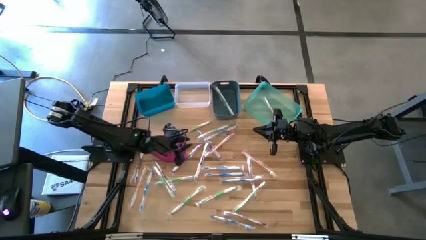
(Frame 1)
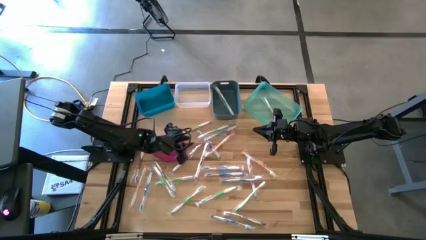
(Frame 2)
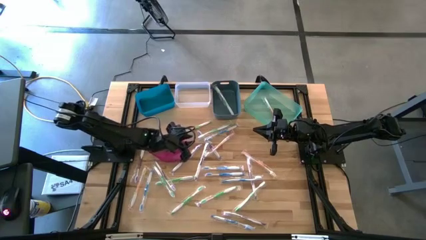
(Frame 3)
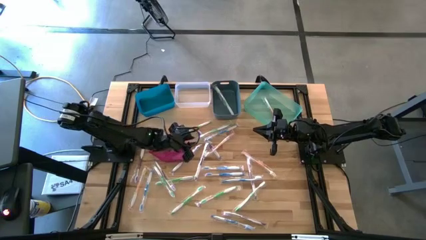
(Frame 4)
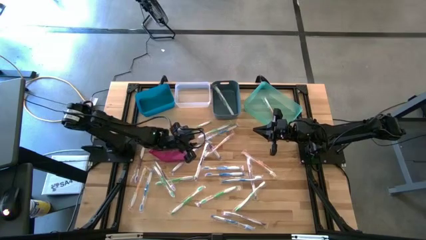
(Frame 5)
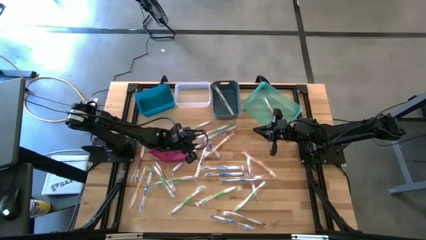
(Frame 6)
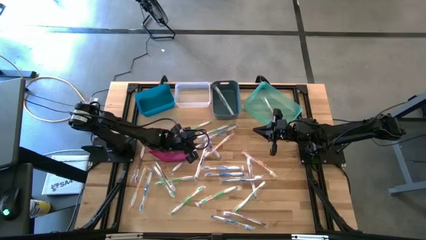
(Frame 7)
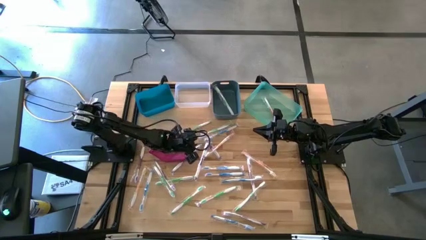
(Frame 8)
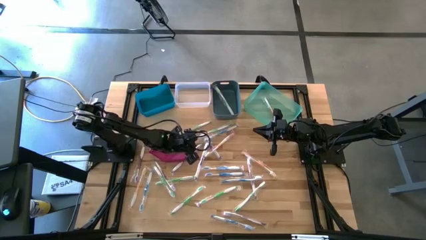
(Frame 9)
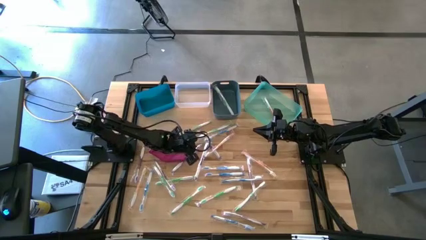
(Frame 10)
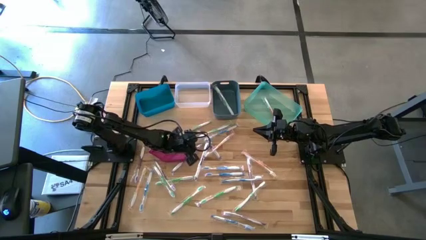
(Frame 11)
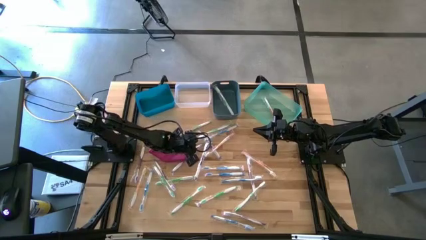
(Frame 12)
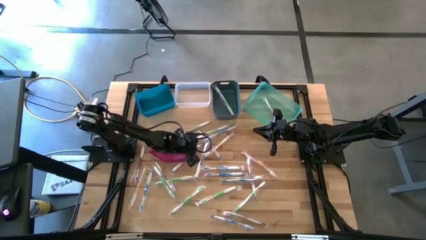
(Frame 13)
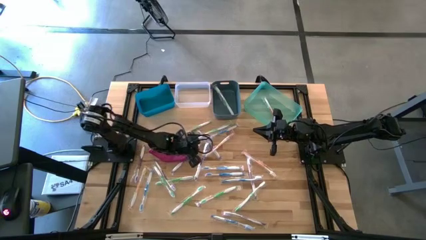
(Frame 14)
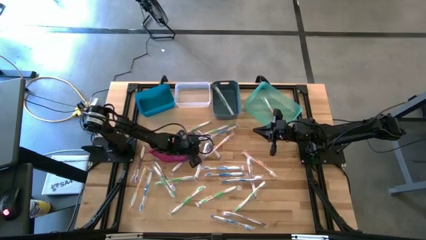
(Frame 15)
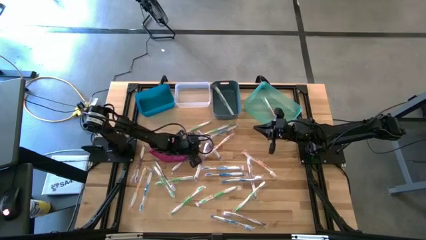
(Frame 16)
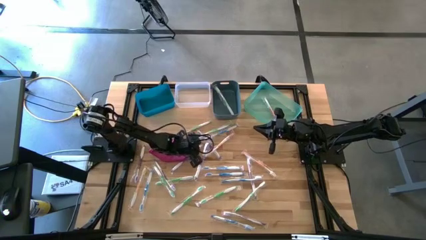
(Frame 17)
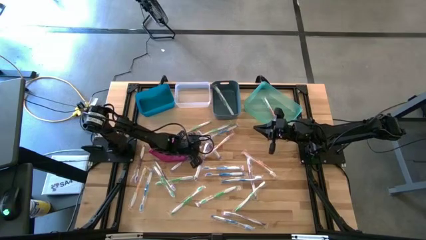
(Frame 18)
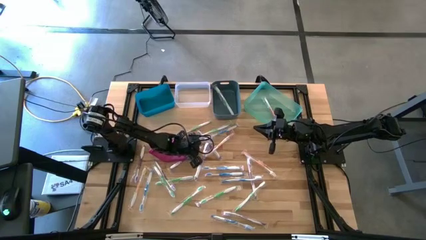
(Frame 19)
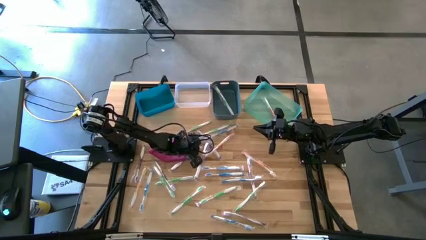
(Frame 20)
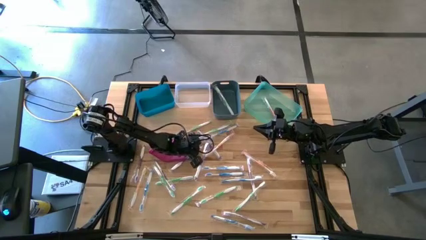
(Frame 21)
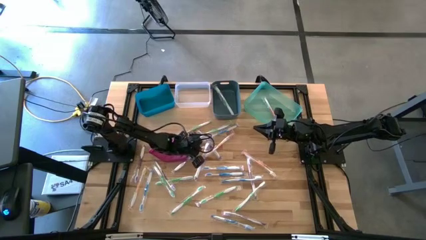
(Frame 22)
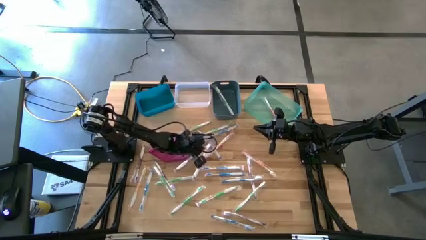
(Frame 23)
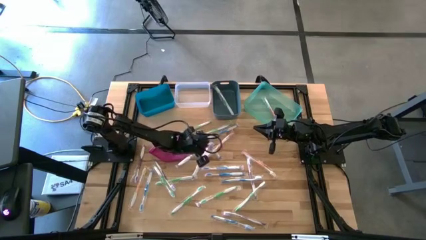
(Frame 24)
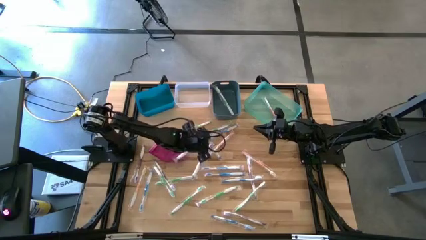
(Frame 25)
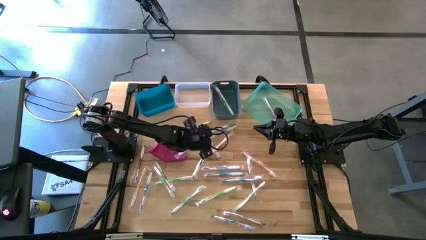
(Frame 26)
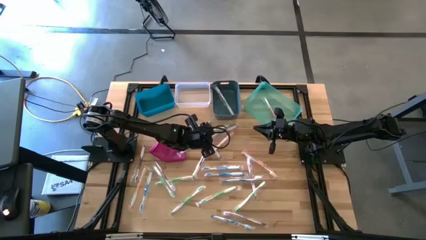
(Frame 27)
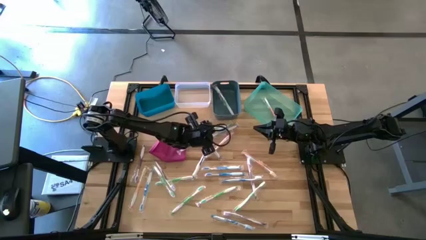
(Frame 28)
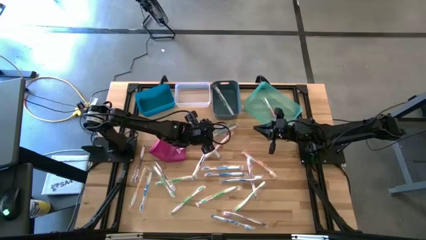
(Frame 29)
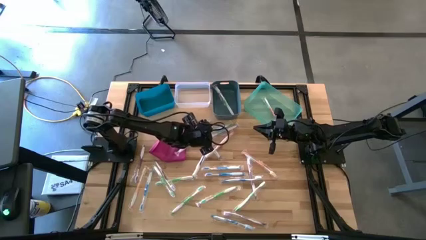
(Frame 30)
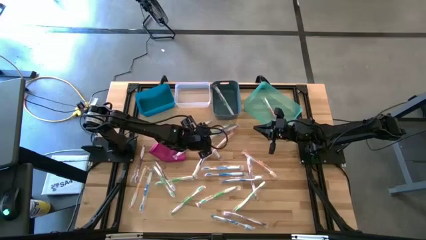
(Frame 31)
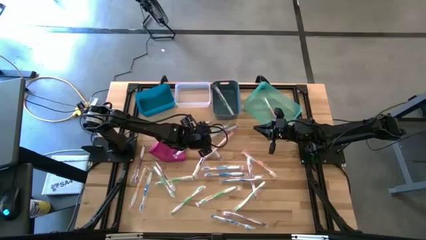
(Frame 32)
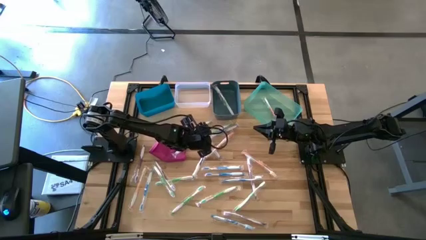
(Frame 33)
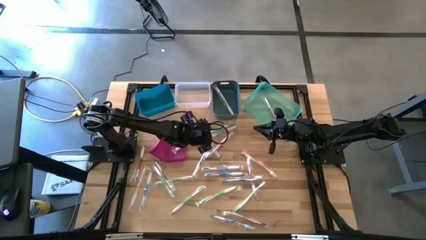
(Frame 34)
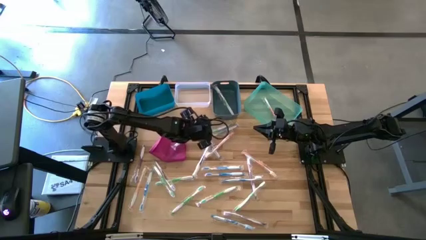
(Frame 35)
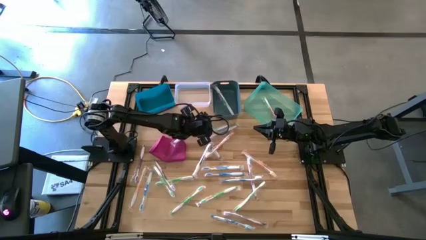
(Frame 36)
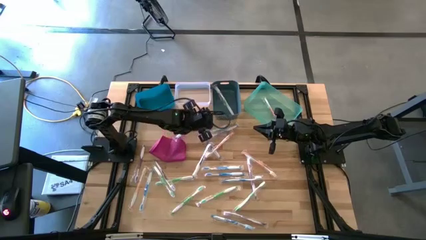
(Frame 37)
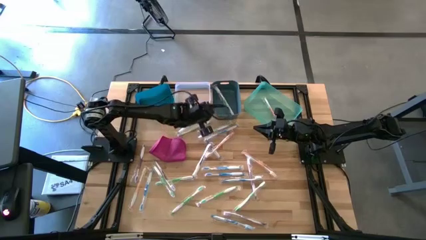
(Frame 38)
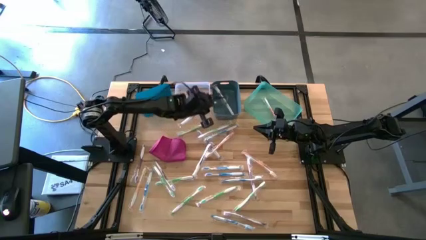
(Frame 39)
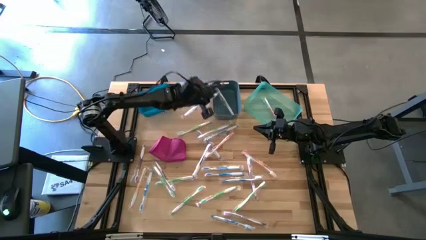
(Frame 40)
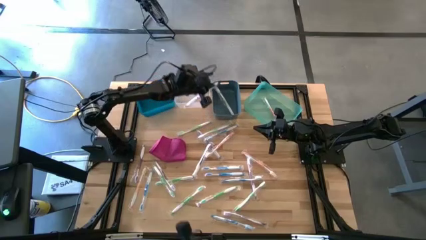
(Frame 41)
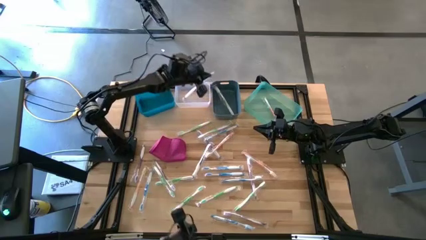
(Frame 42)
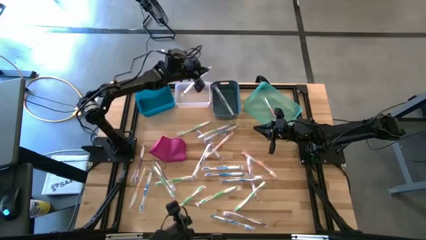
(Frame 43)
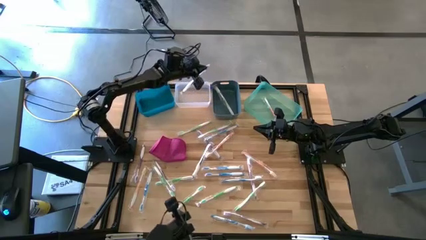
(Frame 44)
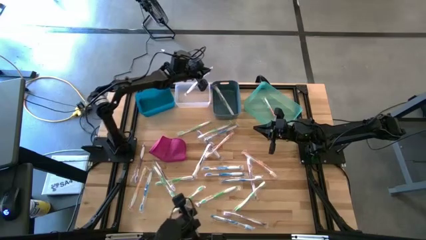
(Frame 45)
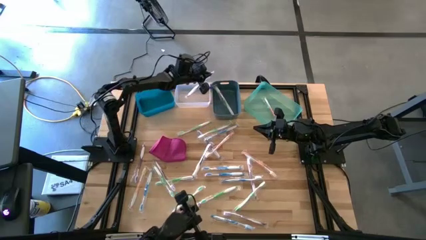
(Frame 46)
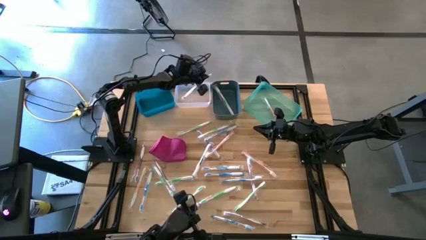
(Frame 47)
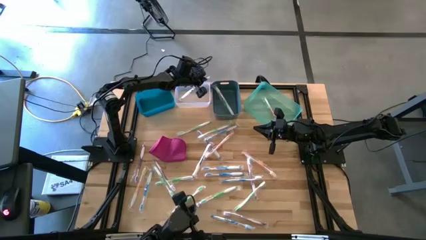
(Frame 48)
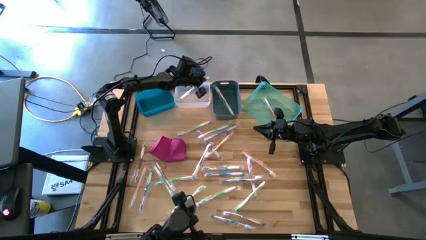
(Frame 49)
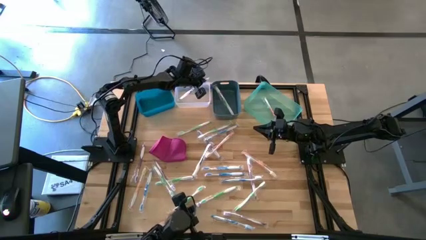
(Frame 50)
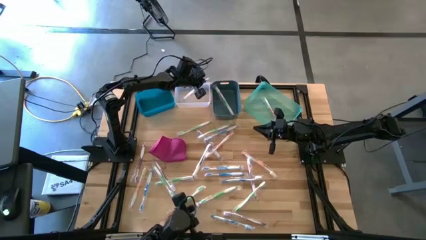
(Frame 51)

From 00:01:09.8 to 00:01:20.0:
Task: Pick & Place Toothbrushes
Put the violet toothbrush into the white bin

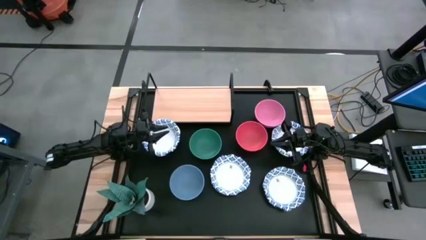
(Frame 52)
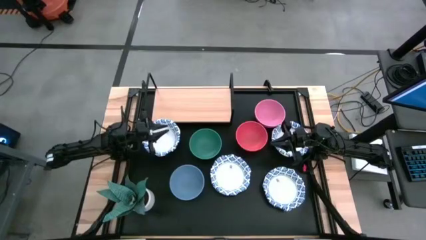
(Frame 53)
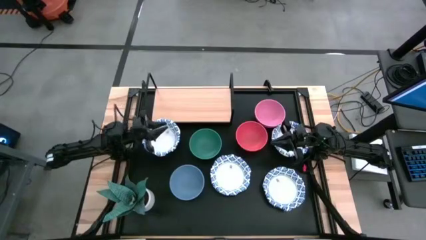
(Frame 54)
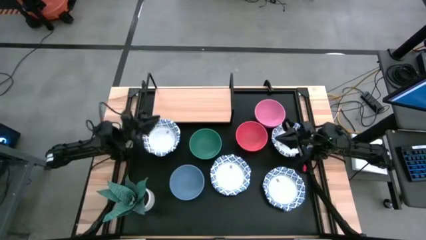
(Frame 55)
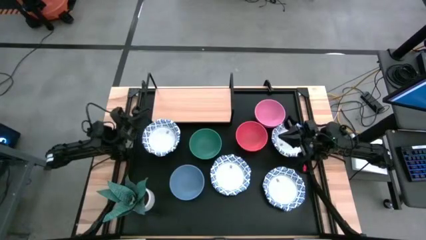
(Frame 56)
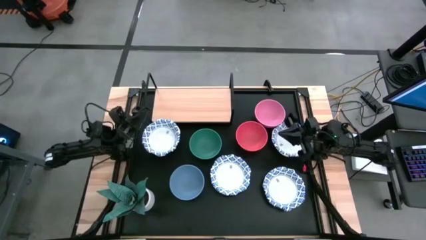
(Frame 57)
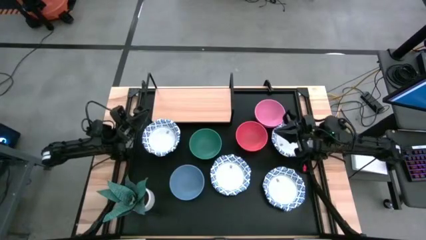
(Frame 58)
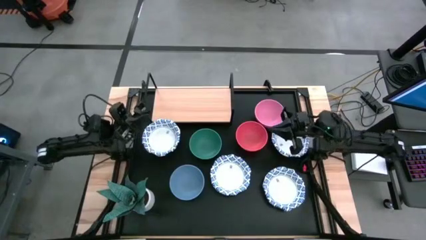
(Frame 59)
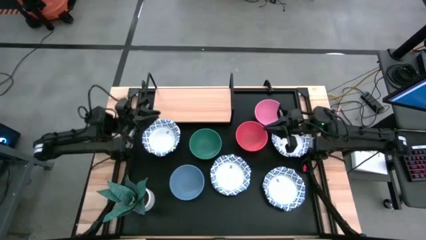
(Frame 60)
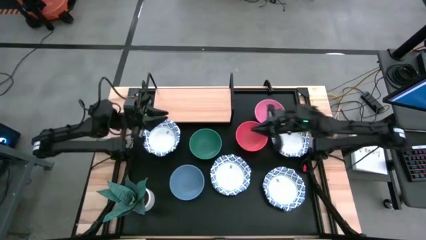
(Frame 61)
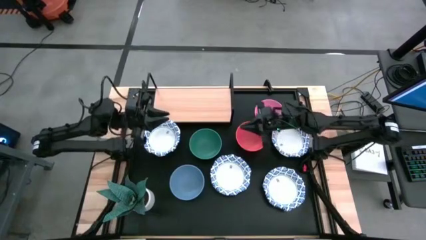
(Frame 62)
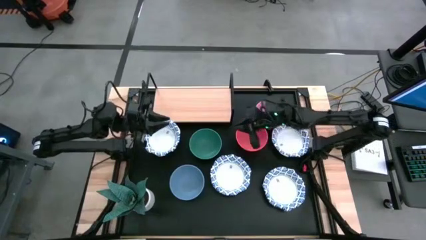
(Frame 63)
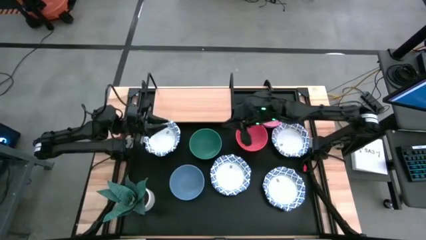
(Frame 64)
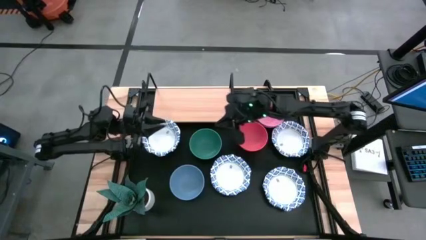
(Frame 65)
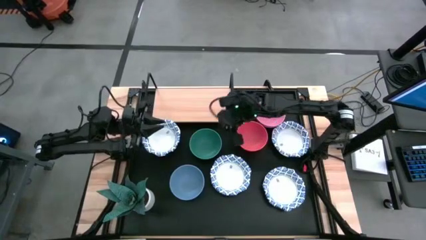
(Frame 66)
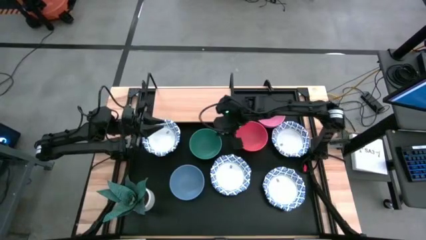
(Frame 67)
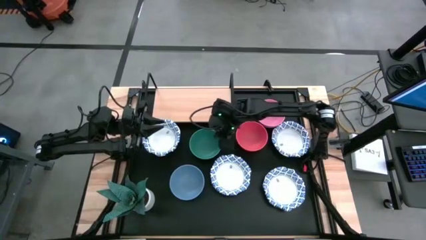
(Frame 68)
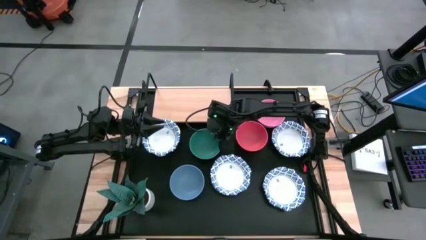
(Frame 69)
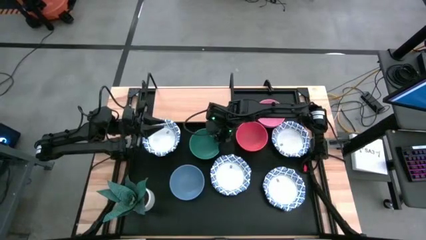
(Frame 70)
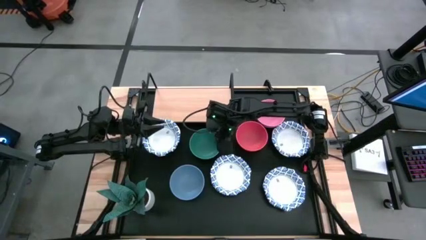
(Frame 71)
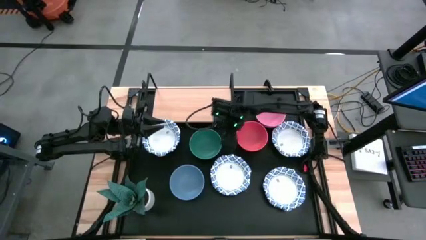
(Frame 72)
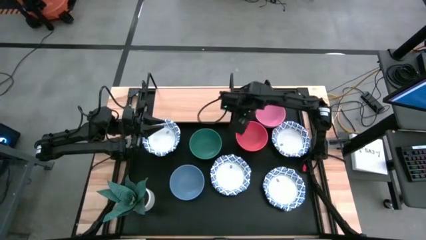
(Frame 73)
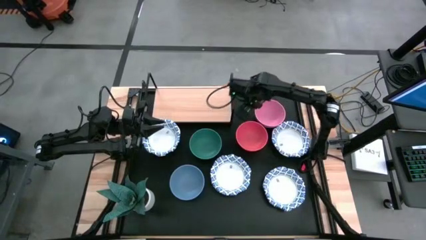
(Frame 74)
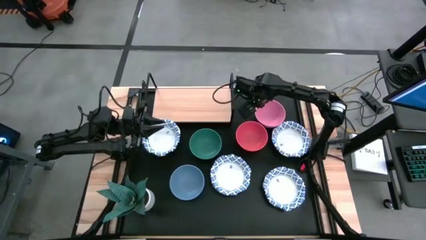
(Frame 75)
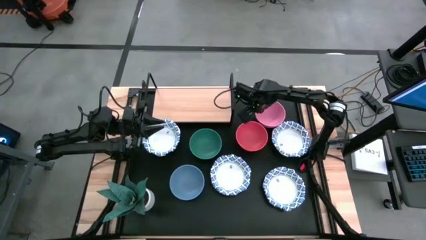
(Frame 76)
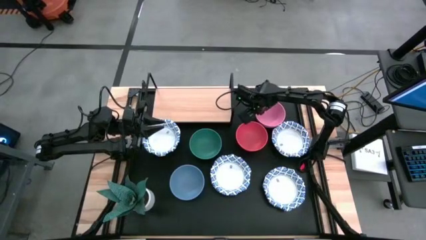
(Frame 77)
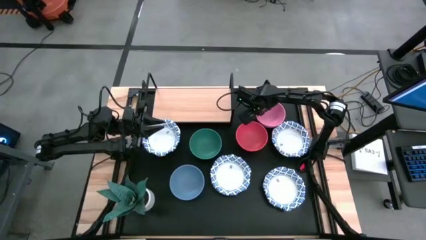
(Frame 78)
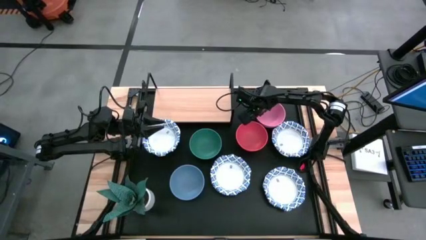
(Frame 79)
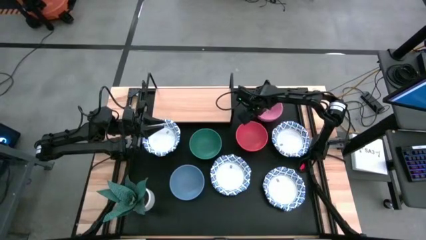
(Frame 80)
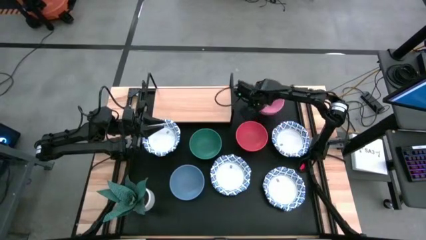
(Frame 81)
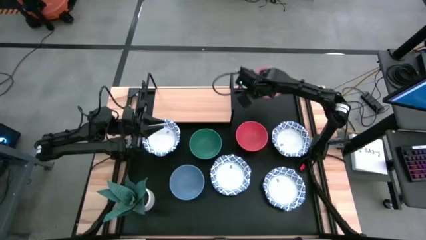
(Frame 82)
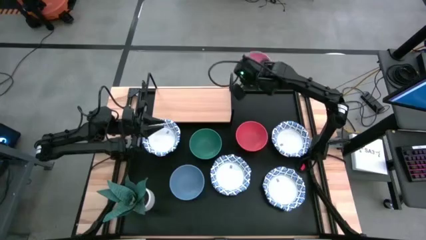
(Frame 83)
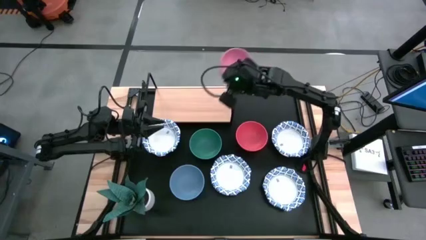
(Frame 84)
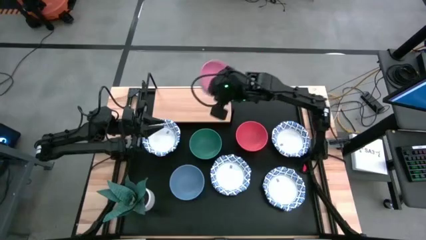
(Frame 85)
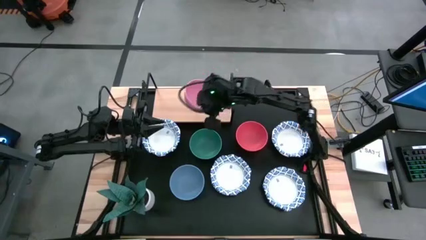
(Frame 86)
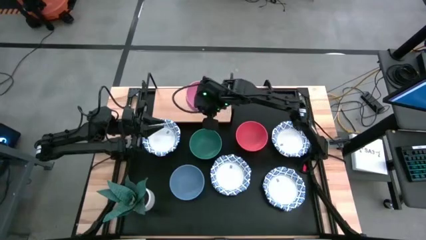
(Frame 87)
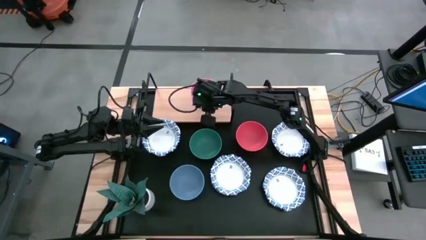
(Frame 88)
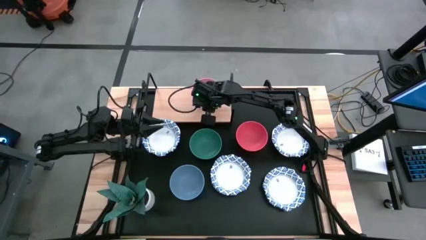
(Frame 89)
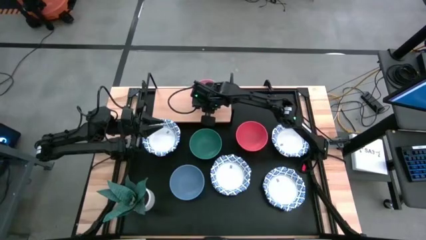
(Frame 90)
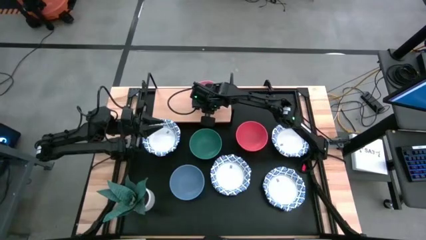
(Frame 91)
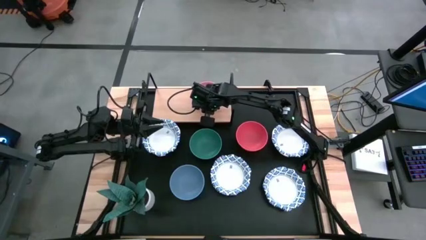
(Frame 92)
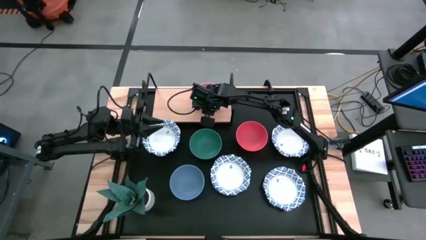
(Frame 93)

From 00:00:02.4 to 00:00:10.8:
Task: Place and stack bowls onto a shelf
Put the pink bowl on the shelf
